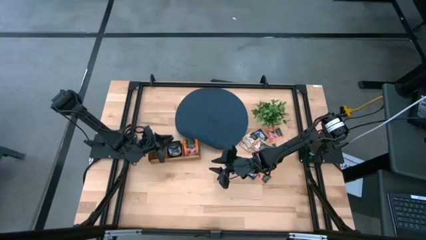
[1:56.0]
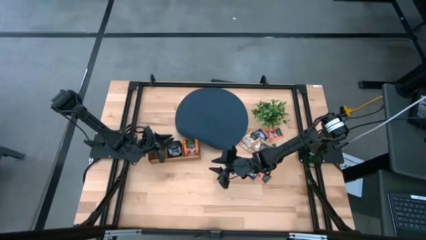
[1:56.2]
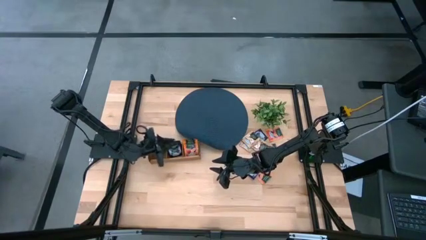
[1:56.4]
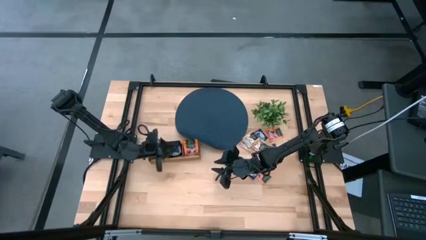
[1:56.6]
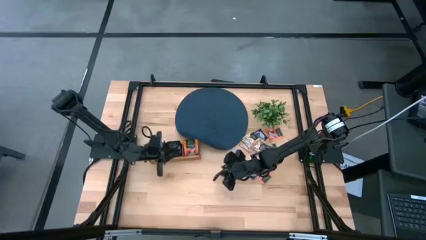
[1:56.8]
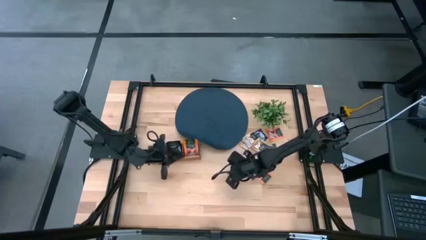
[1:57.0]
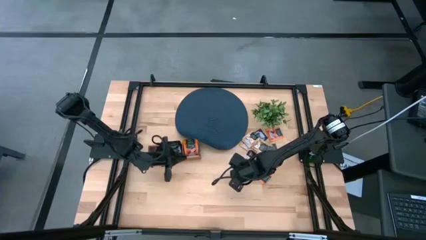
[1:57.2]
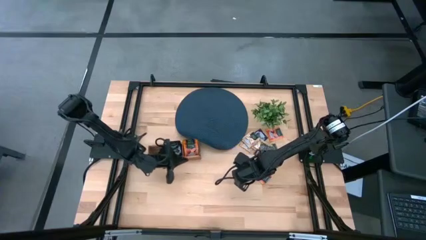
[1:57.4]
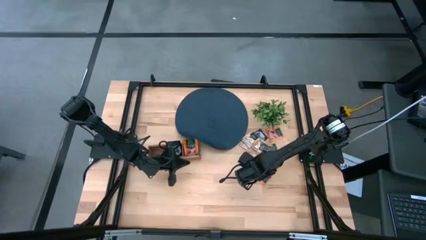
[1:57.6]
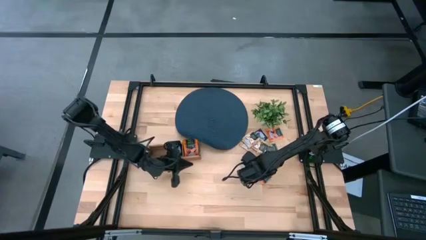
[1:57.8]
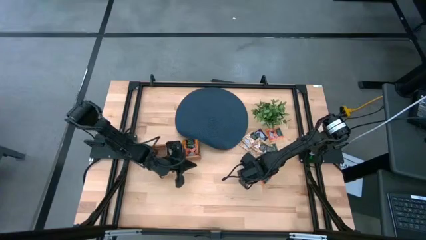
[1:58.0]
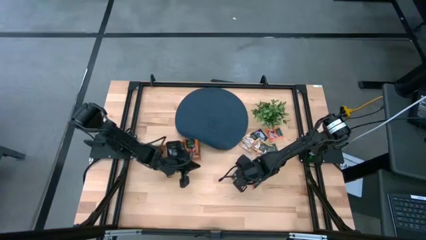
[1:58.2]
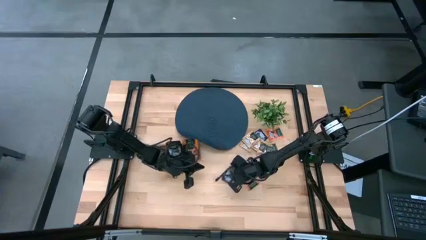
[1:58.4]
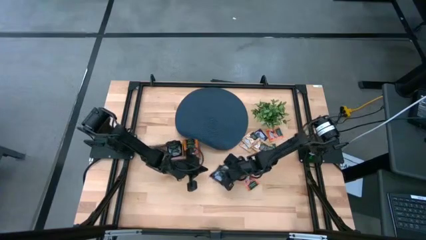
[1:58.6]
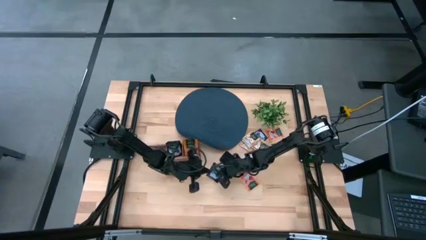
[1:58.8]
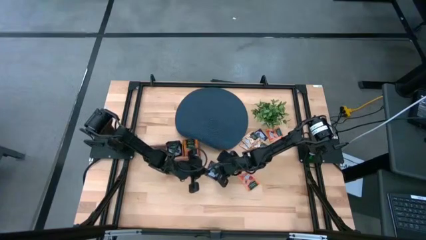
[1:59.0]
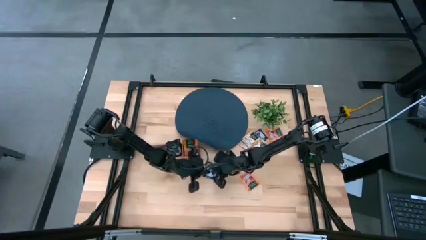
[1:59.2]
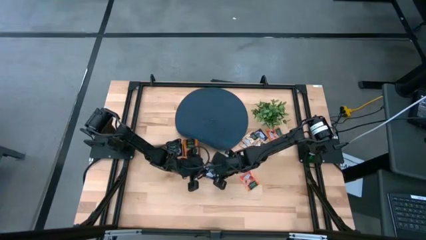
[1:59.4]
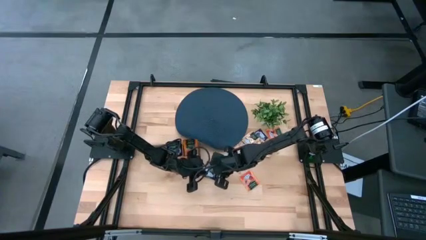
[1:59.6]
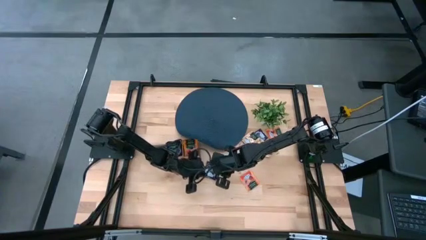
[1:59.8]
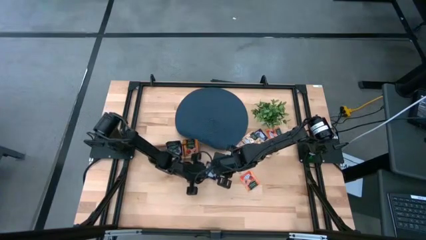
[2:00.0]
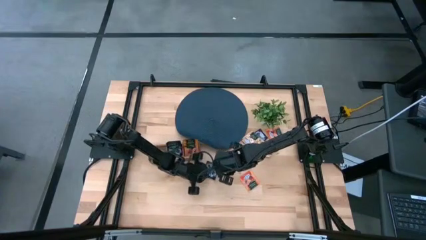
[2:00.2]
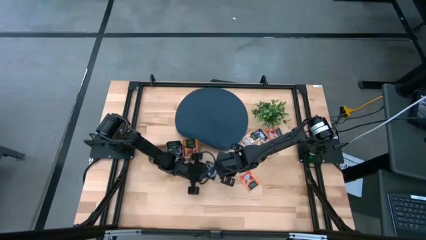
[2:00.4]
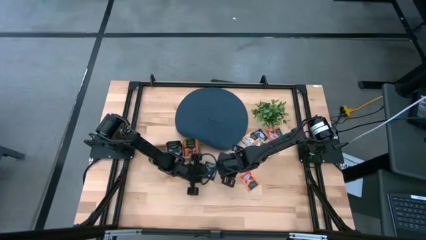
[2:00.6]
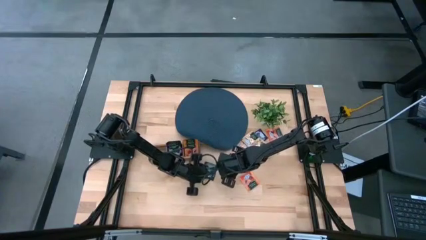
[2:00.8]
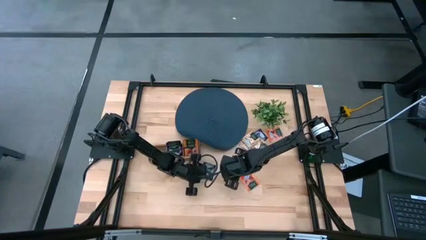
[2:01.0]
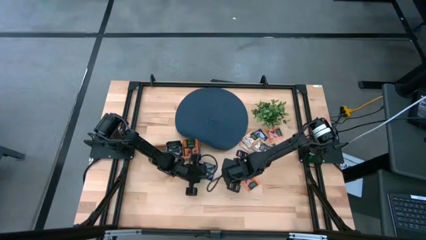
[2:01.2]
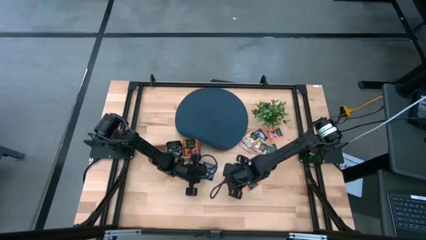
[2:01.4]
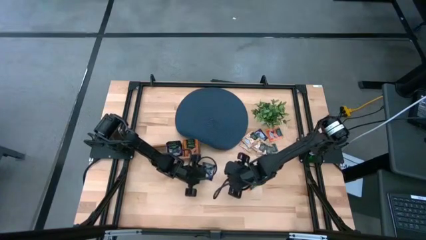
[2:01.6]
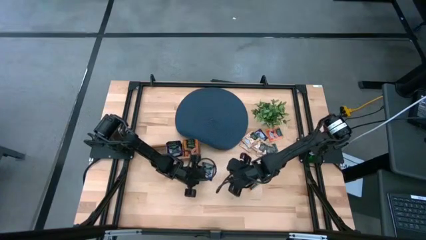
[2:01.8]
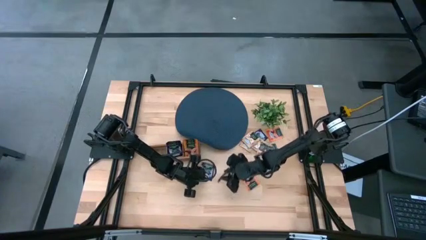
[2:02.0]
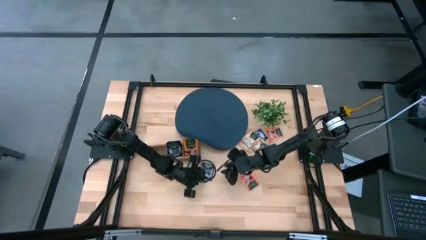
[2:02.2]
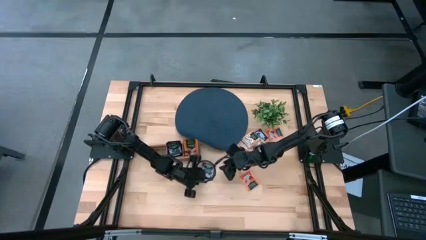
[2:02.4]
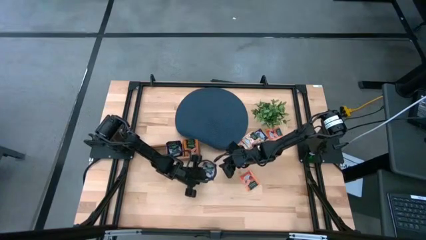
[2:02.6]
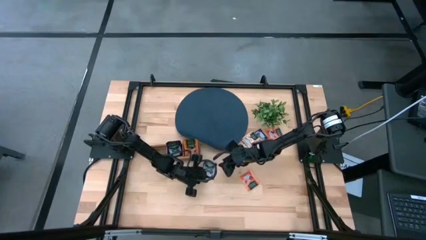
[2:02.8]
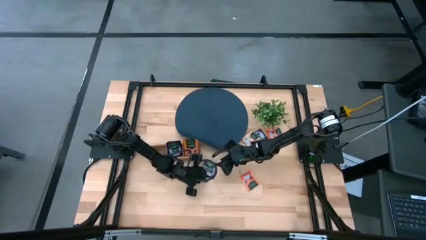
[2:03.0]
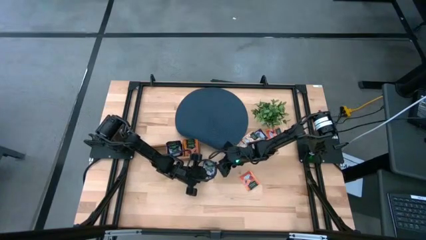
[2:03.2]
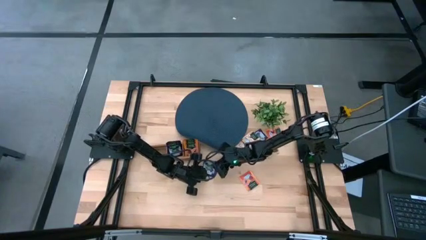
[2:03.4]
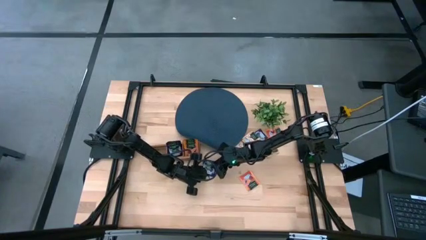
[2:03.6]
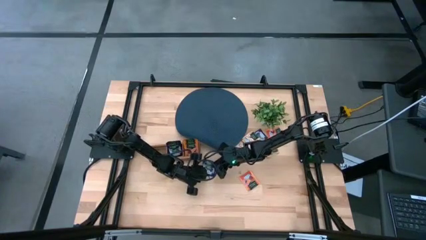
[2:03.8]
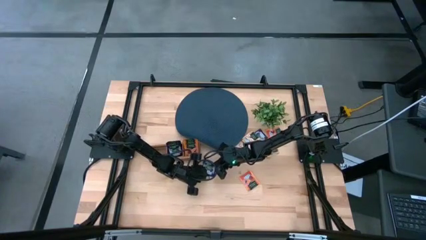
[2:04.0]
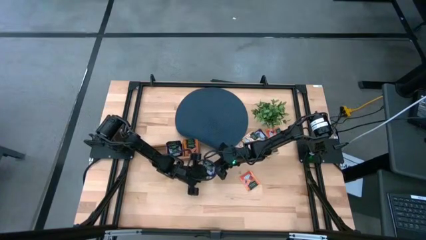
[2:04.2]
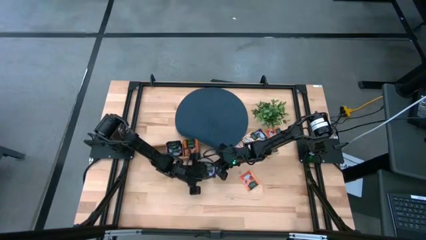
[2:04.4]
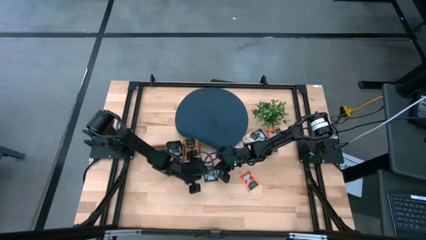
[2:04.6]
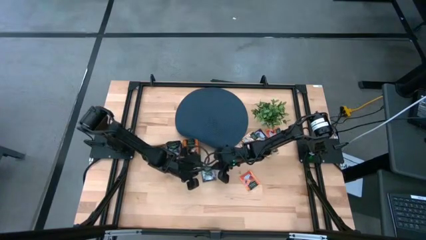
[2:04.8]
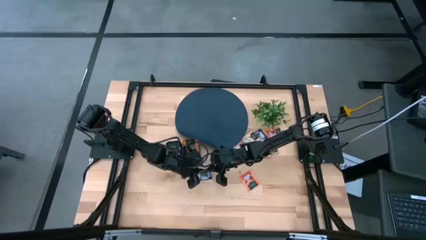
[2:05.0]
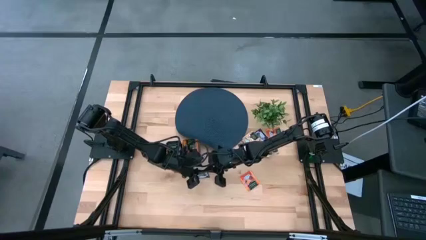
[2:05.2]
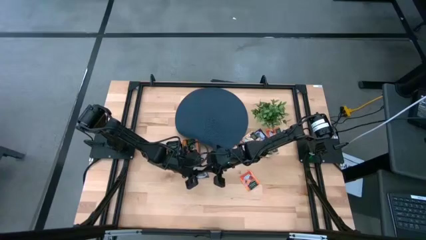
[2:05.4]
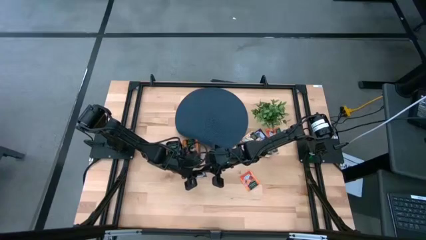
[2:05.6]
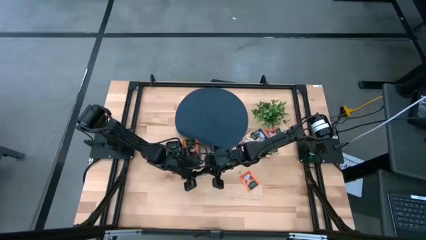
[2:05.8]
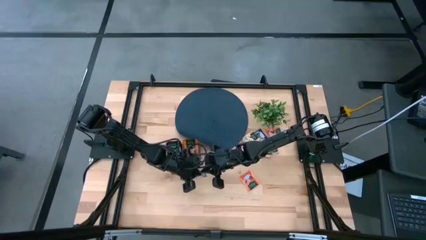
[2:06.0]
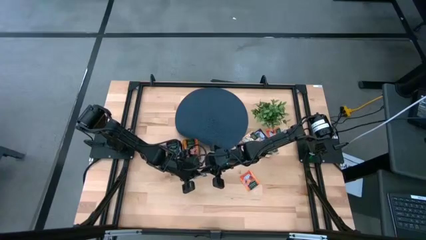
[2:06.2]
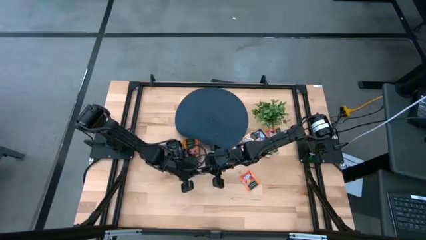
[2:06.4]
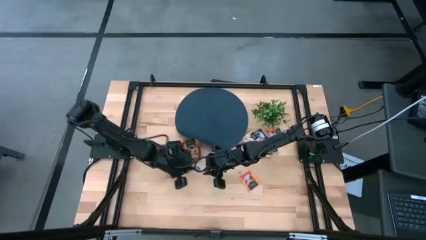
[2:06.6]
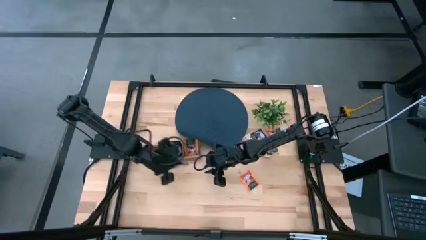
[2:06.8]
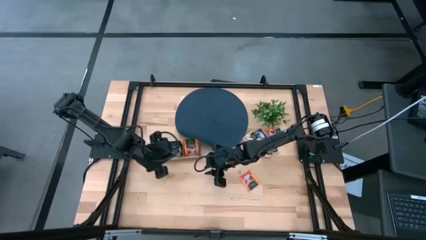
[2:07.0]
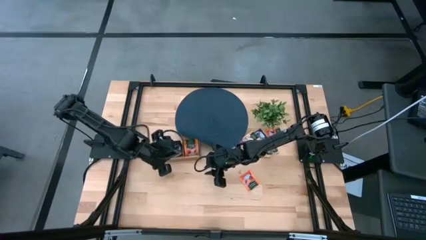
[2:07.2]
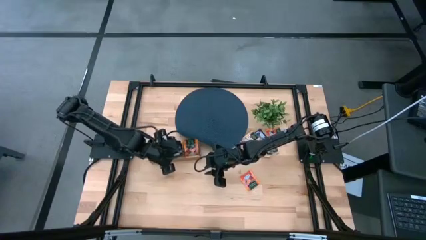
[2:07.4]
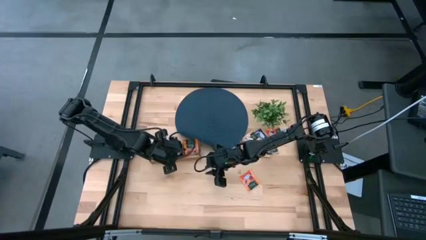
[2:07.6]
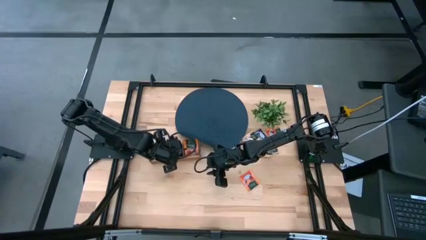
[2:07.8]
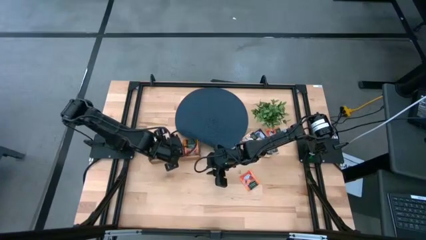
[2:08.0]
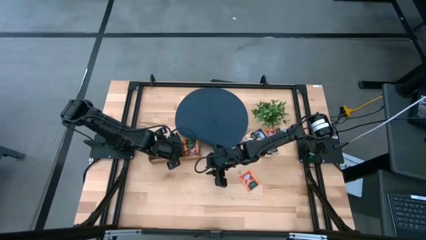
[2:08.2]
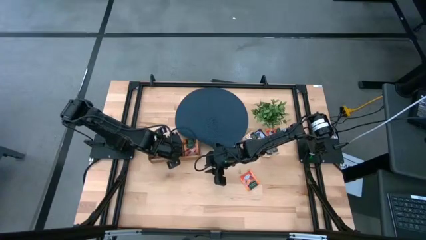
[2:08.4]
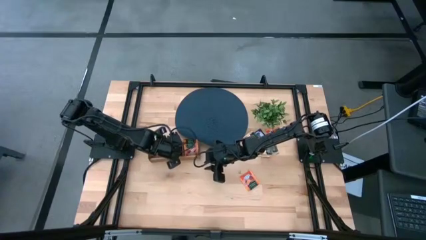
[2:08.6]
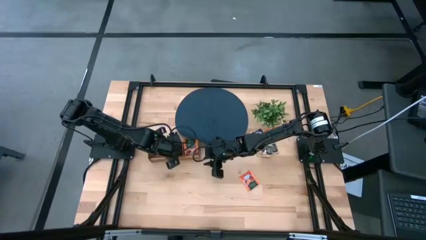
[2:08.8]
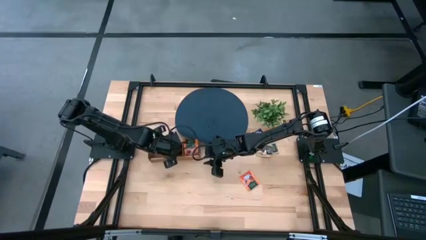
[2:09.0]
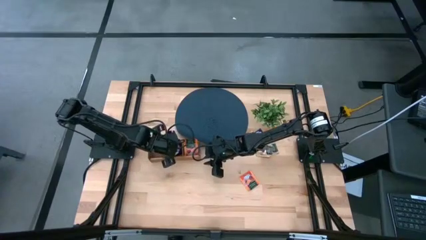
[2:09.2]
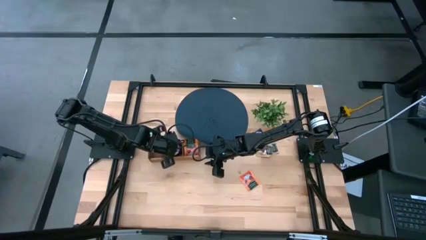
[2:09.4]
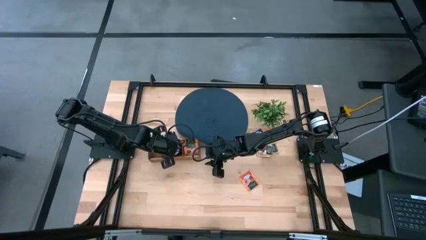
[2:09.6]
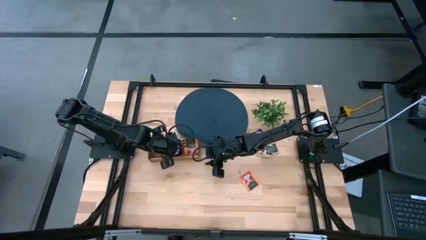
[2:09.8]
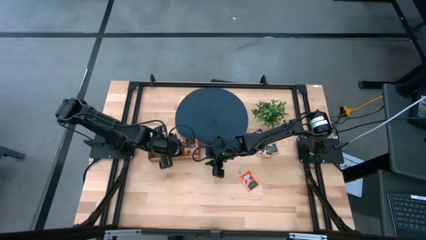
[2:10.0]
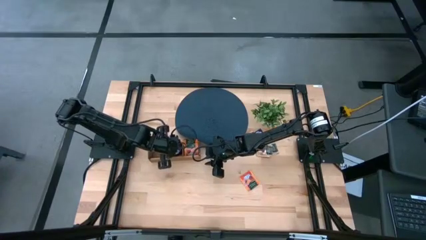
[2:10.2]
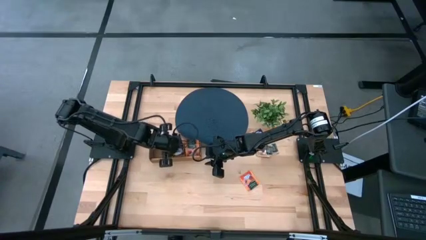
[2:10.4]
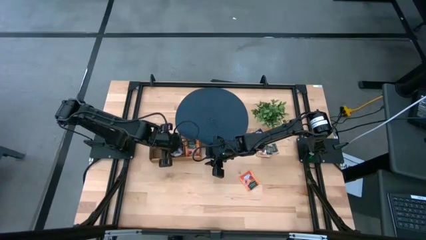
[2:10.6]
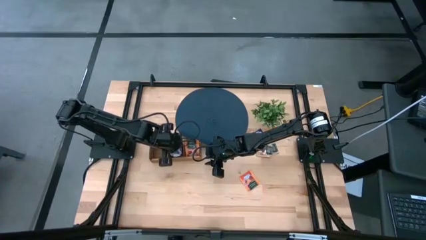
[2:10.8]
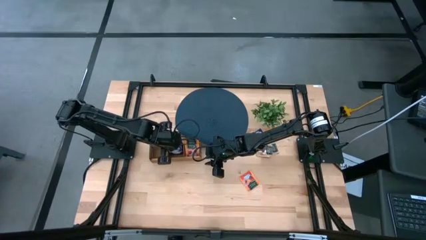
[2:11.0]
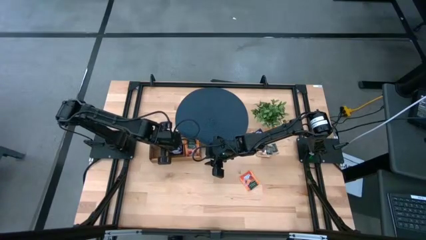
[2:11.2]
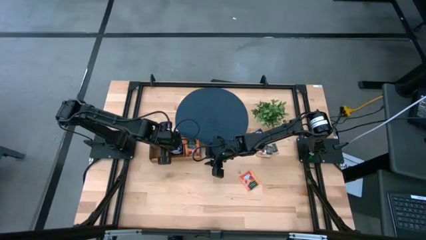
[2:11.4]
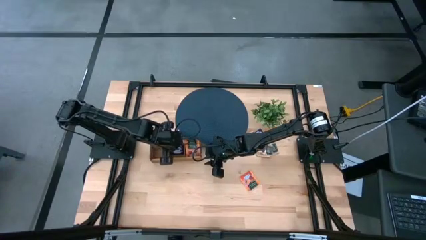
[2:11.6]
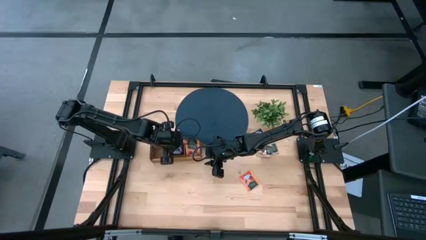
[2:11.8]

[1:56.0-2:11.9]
Task: Pick & Place Tea
Put the blue tea bag into the middle section of the wooden organizer
